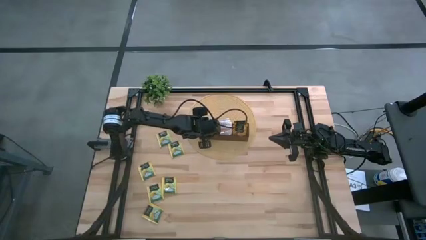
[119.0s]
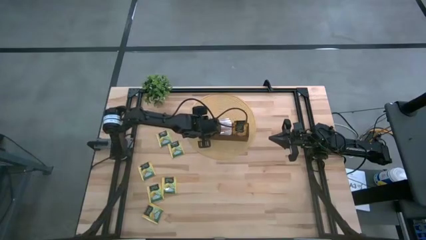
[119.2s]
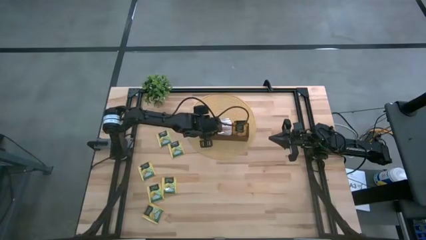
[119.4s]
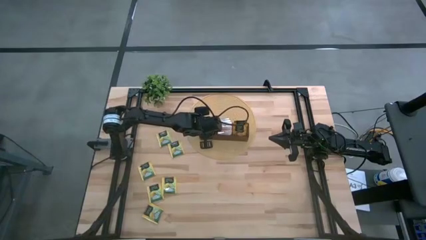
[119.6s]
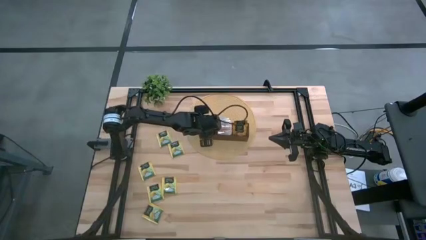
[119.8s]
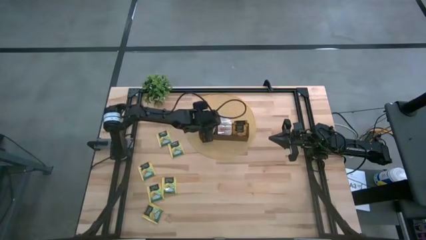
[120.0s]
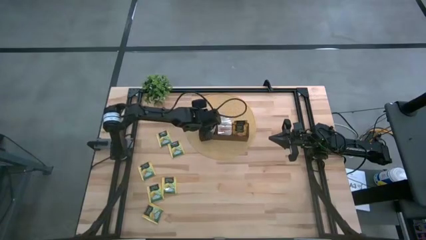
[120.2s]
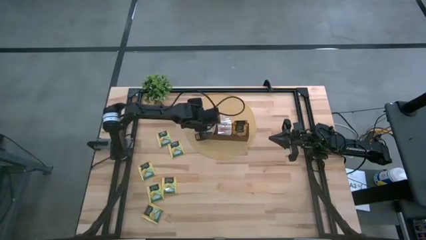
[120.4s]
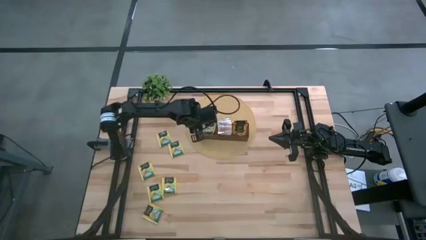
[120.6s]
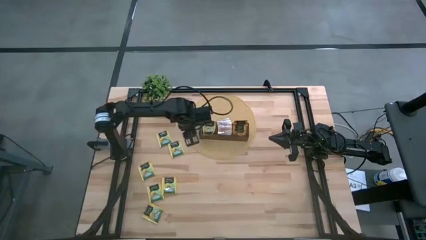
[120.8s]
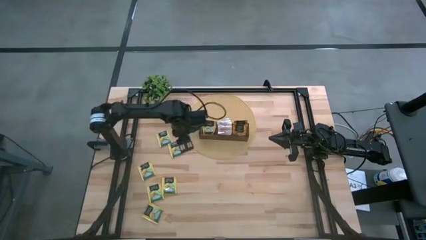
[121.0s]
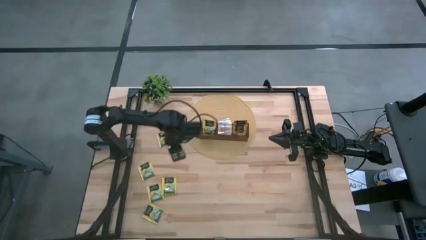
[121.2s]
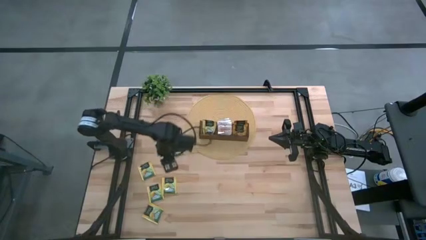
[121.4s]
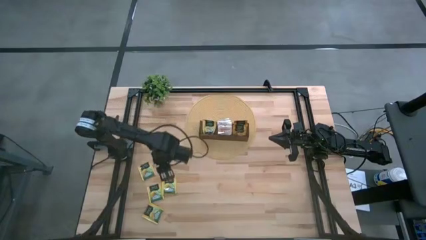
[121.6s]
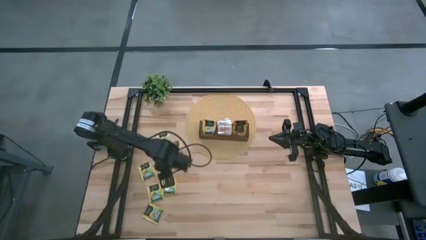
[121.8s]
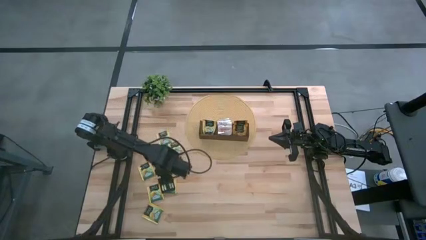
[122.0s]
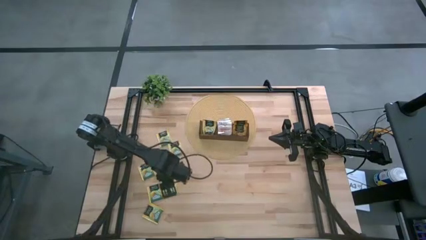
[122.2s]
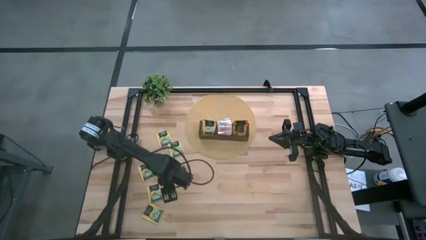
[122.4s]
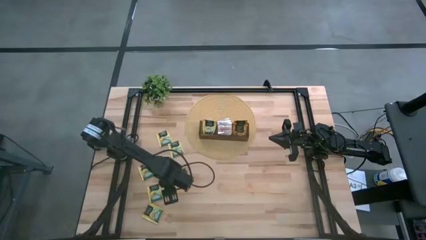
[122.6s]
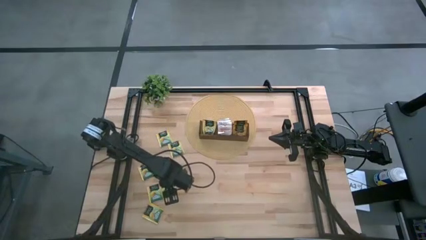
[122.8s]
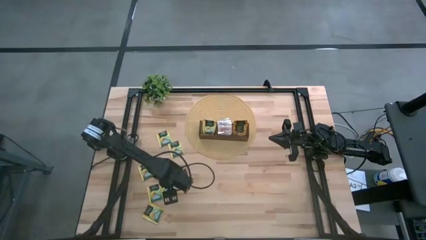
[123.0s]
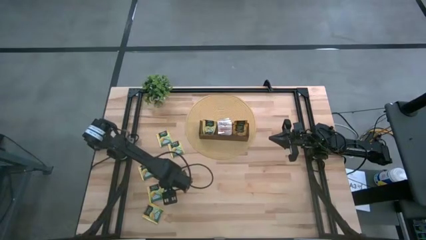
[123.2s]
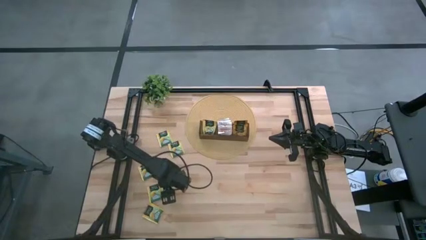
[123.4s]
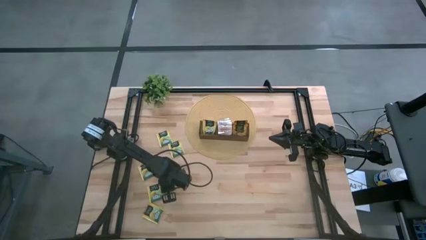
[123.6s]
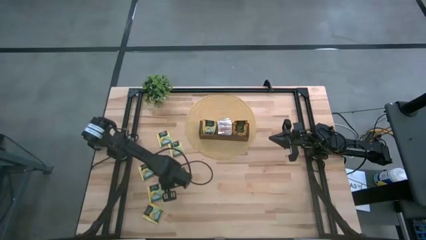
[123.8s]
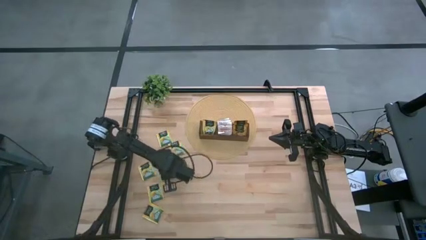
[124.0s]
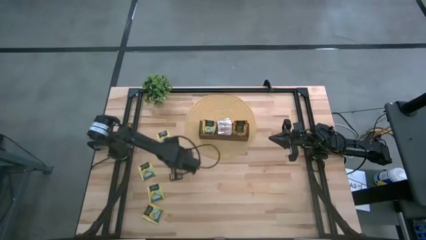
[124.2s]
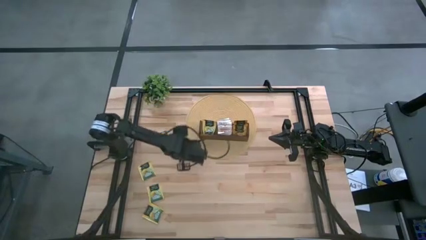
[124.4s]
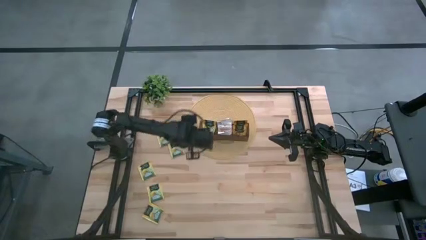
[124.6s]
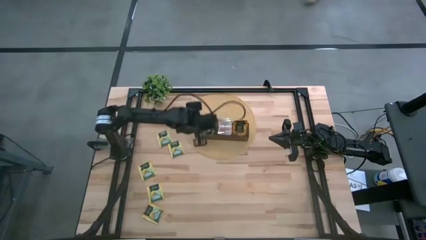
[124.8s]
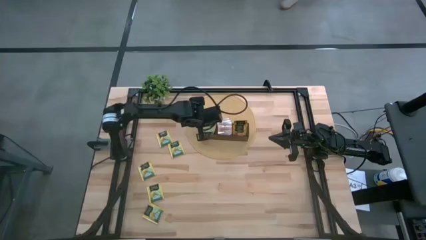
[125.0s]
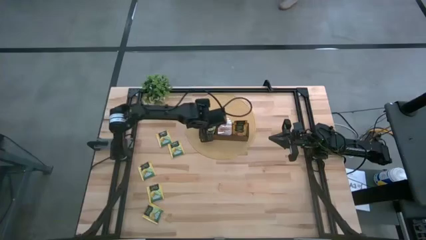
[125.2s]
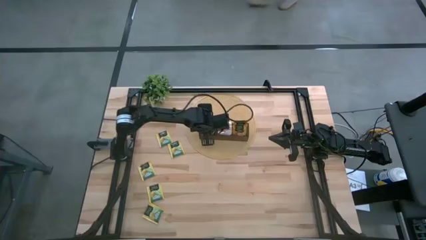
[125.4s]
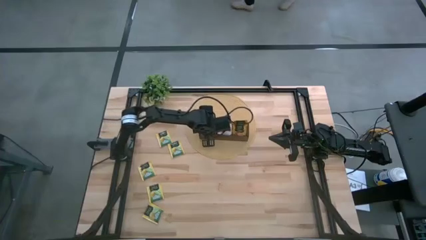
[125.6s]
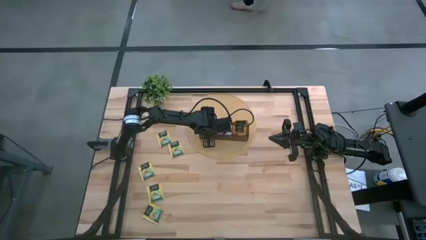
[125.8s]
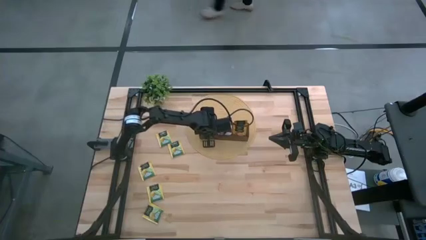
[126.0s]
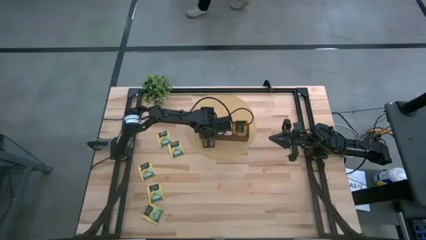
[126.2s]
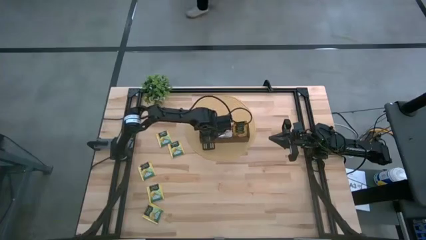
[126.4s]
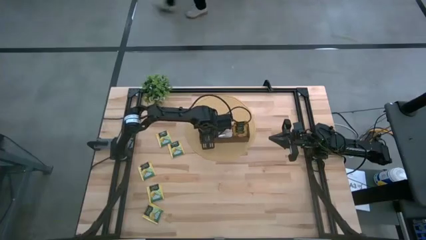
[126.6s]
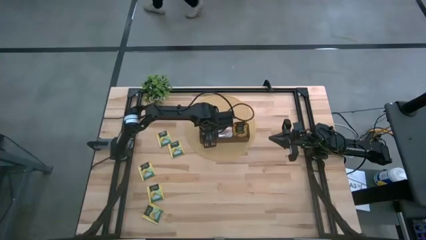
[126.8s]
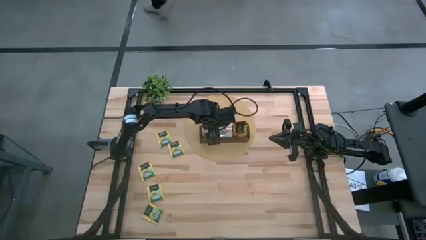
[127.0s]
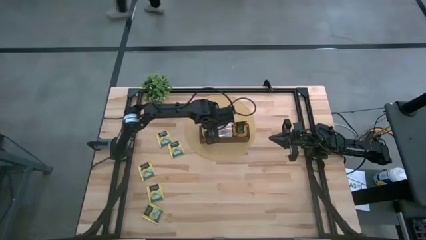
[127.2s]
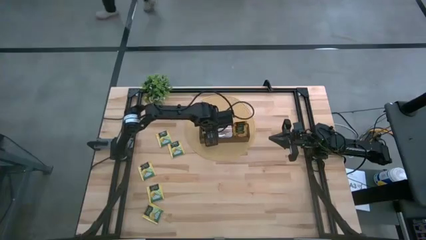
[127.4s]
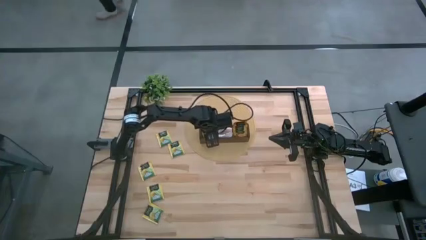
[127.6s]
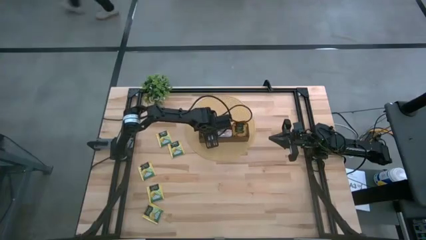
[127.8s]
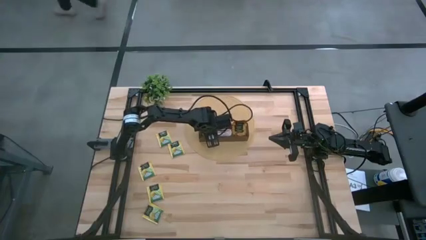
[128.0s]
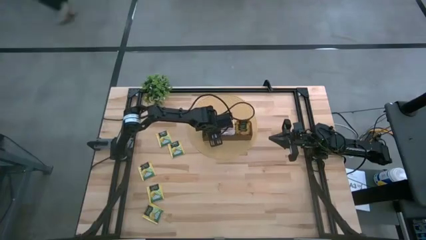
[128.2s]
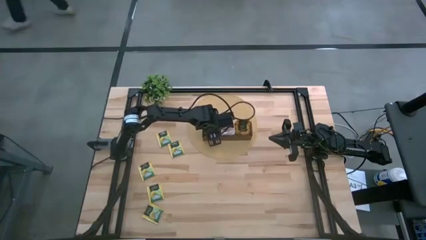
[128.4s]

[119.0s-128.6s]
Task: Pick & Place Tea
Put the yellow tea bag into the left section of the wooden organizer

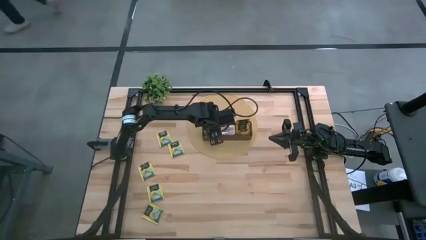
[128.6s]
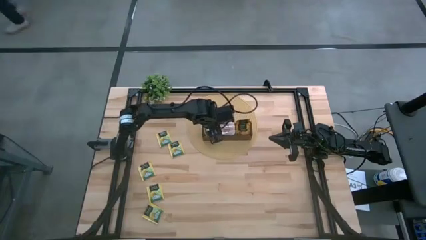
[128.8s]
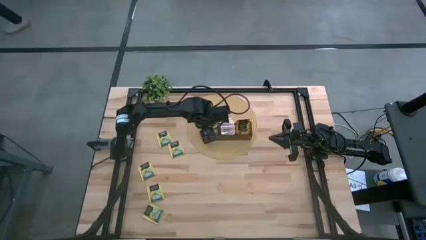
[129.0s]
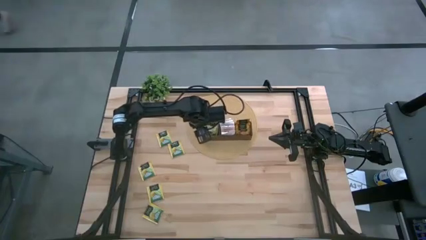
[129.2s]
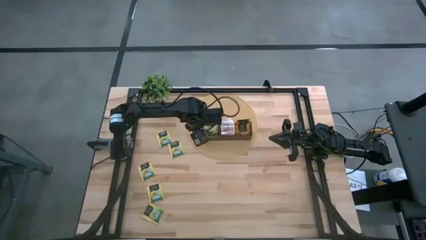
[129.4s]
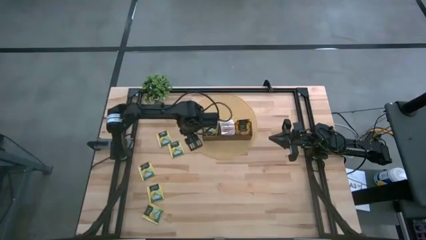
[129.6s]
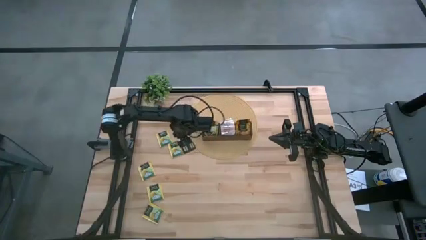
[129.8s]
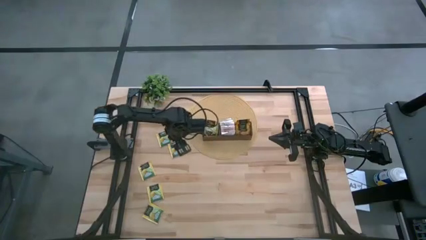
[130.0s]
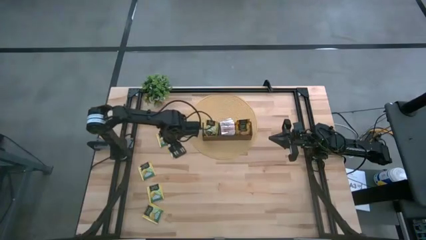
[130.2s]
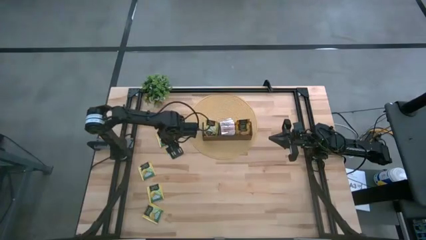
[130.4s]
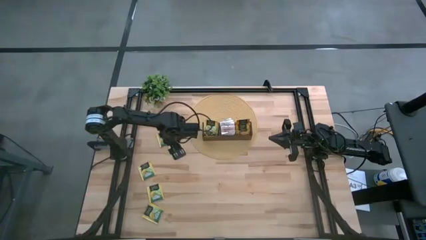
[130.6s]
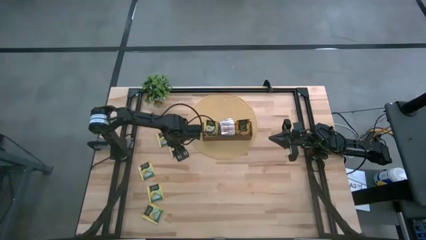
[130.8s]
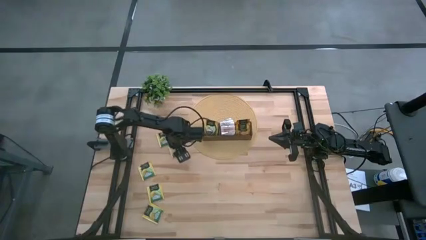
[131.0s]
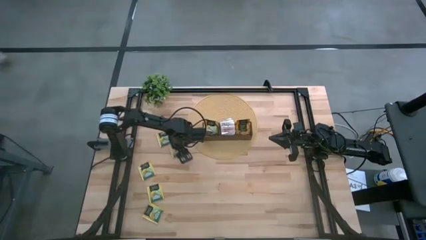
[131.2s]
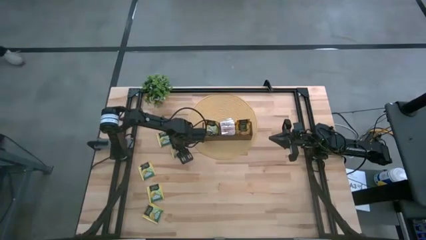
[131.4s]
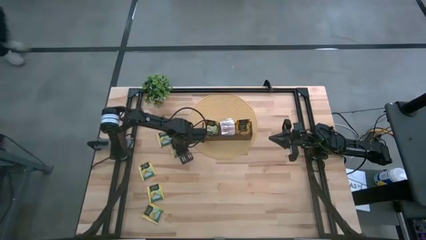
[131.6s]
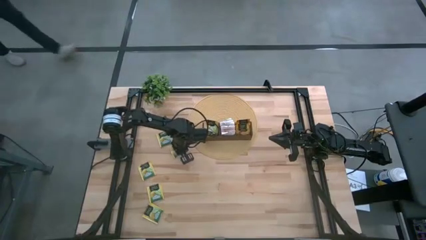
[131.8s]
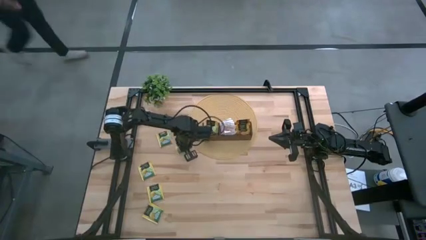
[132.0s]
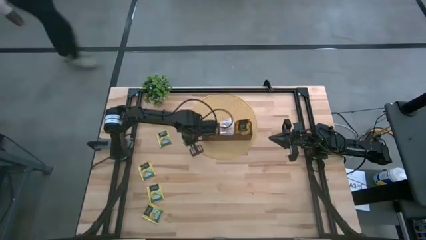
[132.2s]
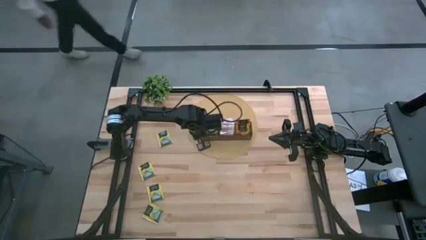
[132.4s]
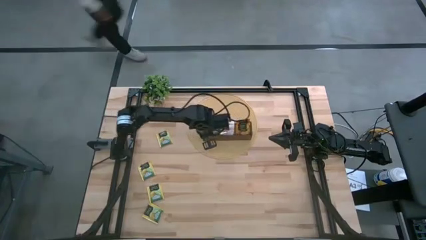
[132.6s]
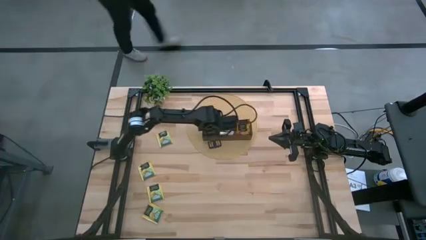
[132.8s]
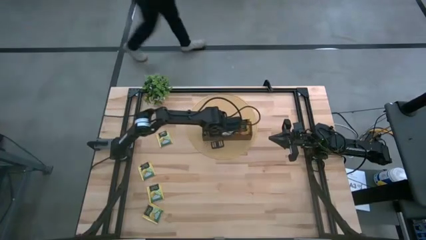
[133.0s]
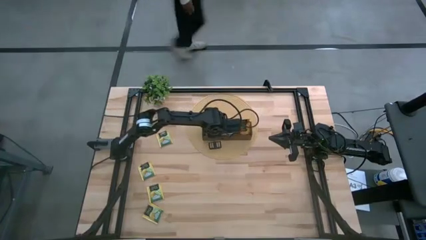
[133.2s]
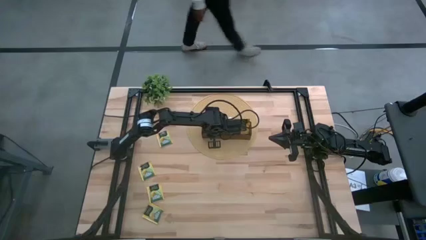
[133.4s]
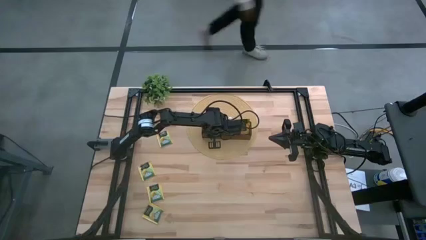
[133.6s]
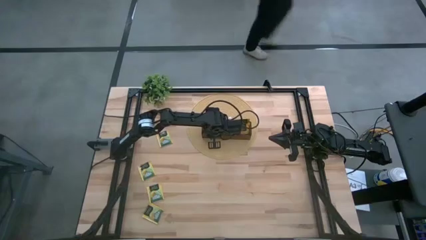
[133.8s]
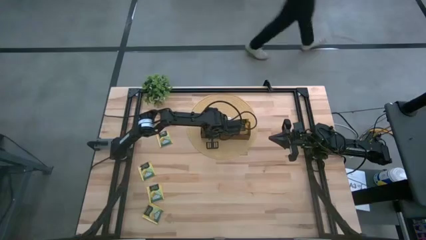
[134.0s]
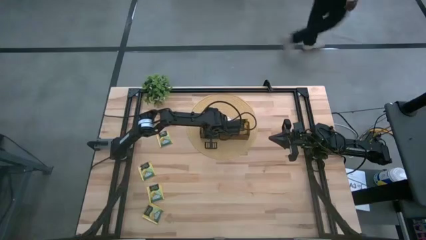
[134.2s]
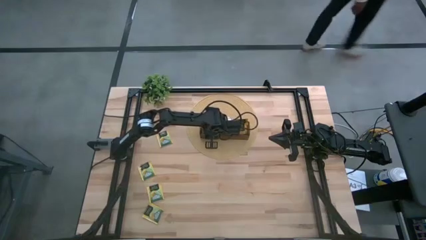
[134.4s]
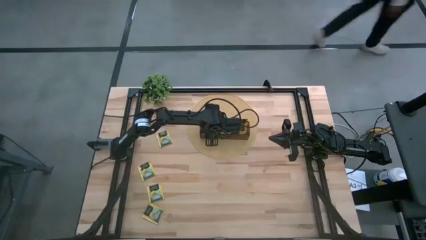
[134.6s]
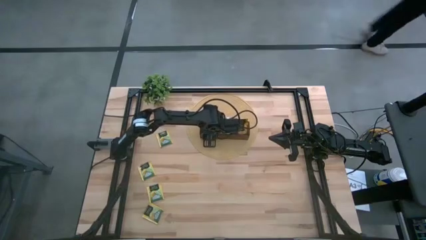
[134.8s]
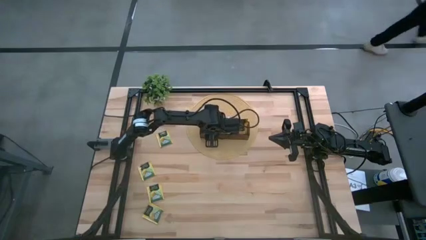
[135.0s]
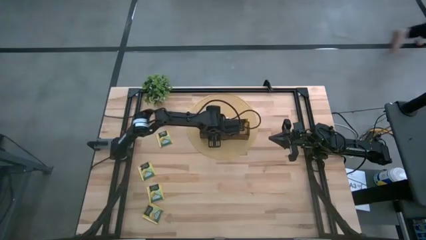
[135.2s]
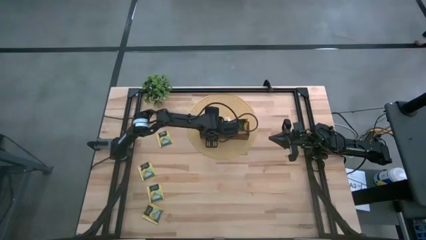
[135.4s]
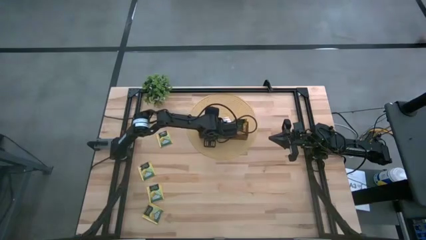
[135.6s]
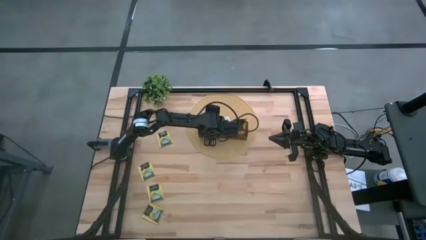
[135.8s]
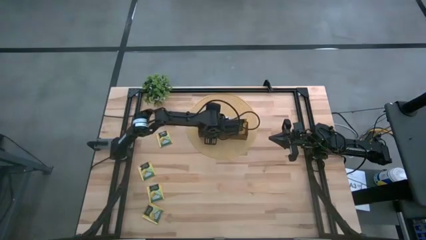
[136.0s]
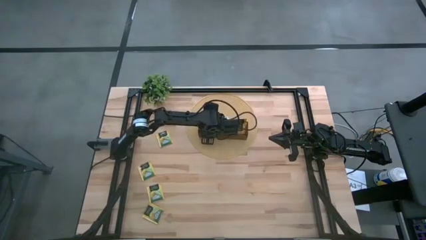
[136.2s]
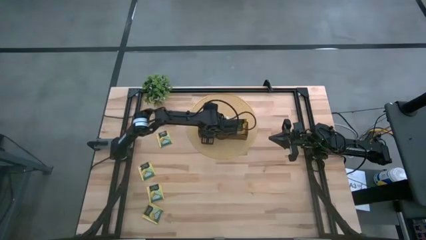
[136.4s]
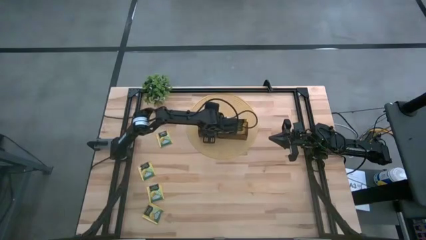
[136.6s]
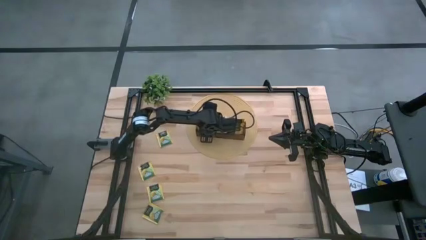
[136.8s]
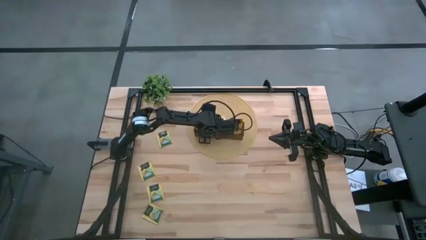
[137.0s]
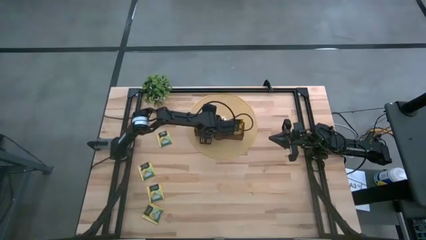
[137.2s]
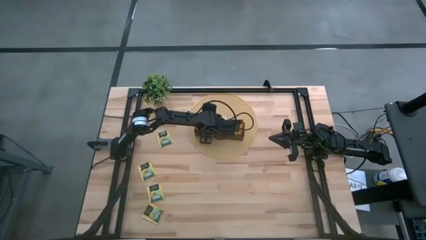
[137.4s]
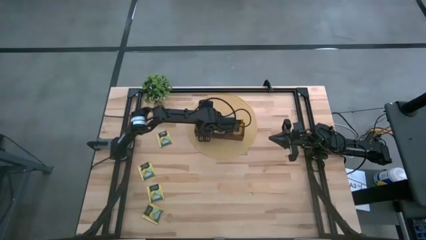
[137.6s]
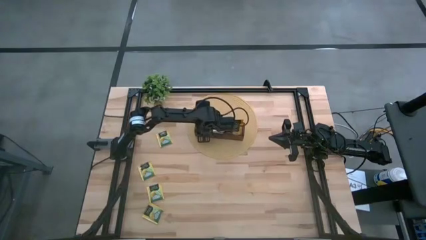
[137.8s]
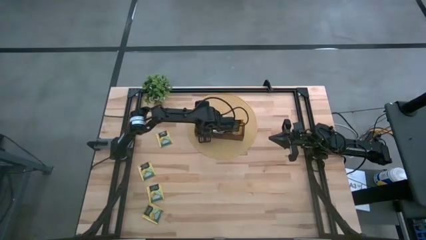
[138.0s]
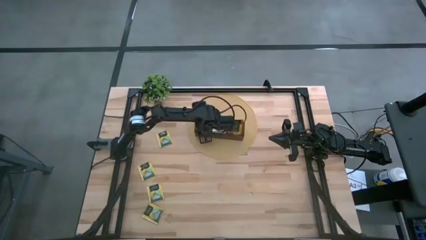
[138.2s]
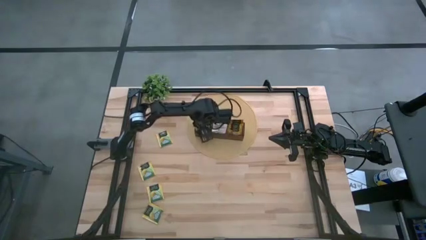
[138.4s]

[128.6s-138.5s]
Put the yellow tea bag into the left section of the wooden organizer
